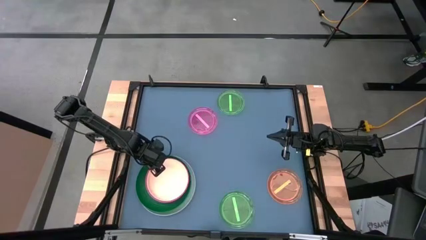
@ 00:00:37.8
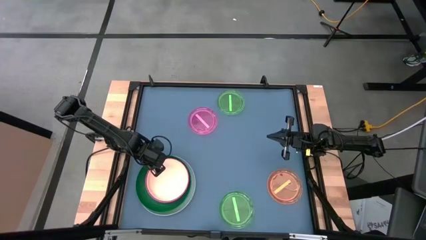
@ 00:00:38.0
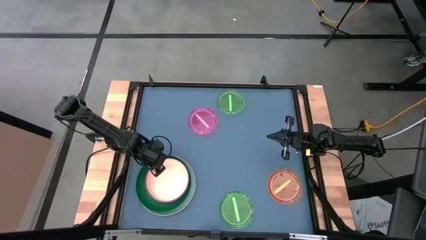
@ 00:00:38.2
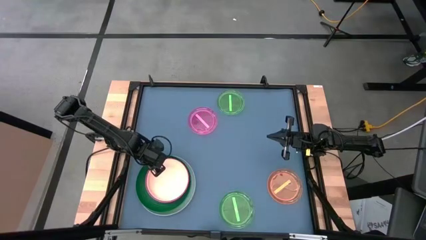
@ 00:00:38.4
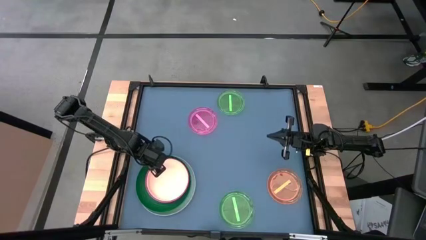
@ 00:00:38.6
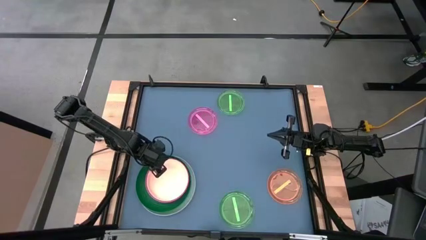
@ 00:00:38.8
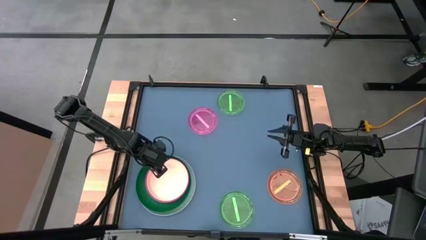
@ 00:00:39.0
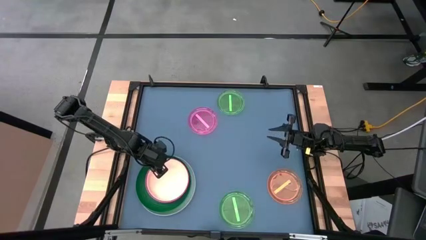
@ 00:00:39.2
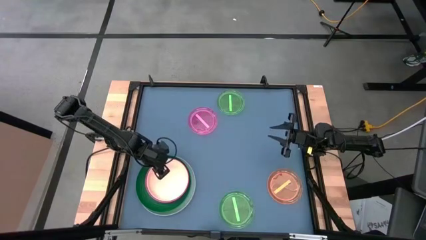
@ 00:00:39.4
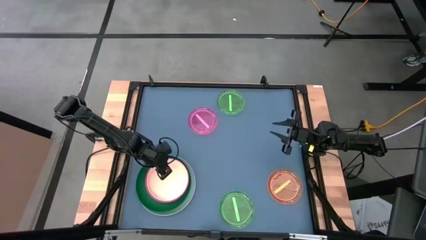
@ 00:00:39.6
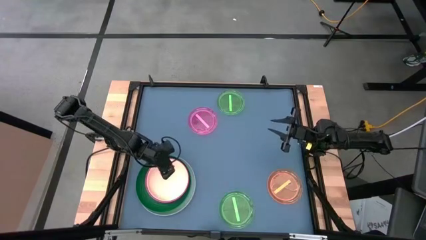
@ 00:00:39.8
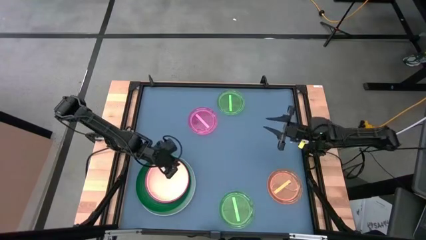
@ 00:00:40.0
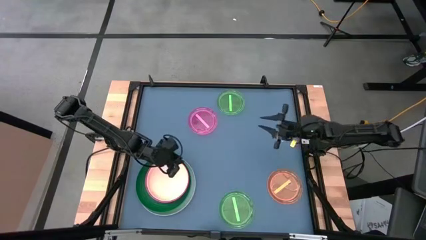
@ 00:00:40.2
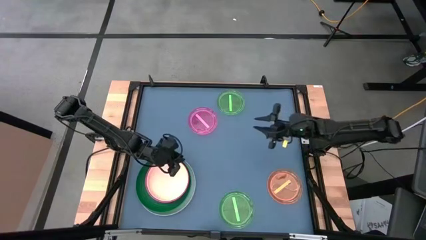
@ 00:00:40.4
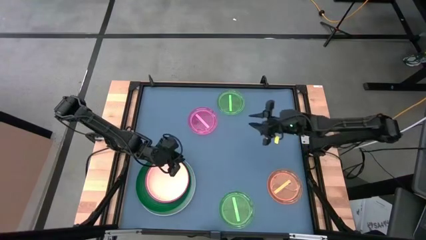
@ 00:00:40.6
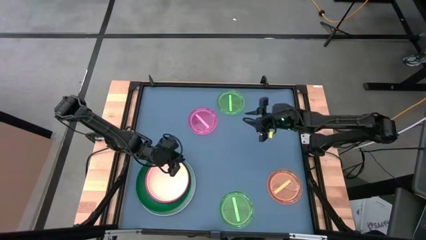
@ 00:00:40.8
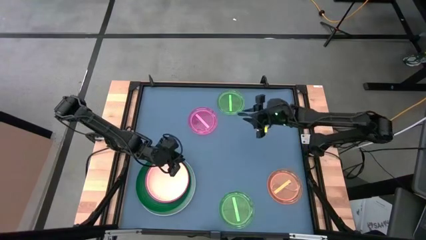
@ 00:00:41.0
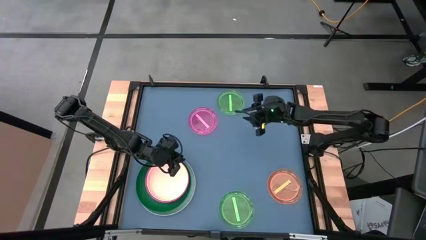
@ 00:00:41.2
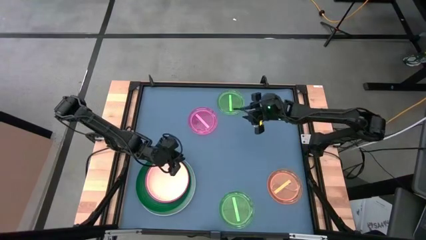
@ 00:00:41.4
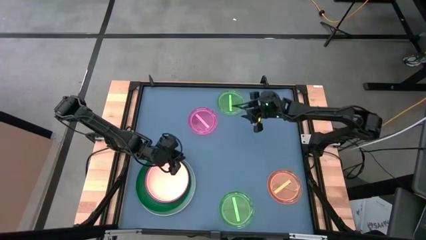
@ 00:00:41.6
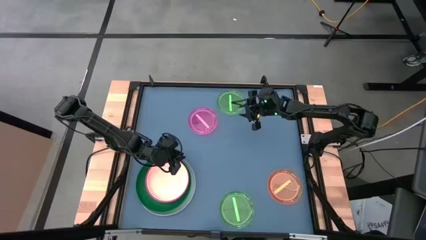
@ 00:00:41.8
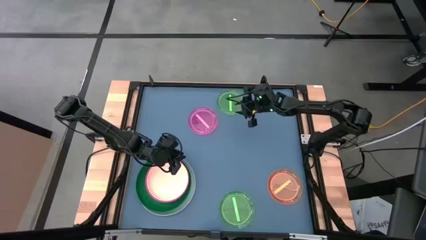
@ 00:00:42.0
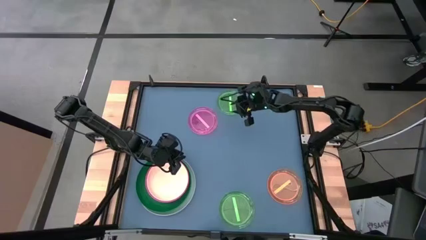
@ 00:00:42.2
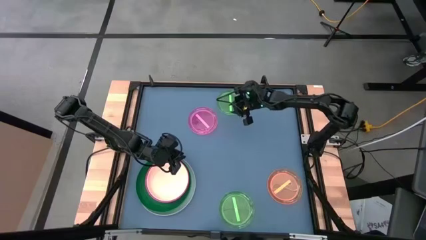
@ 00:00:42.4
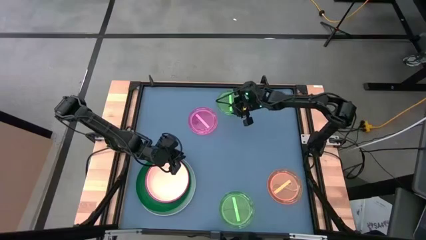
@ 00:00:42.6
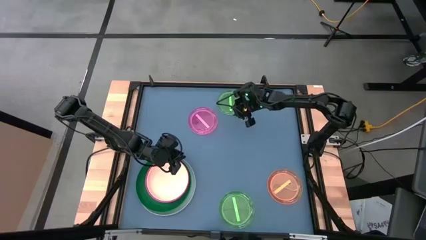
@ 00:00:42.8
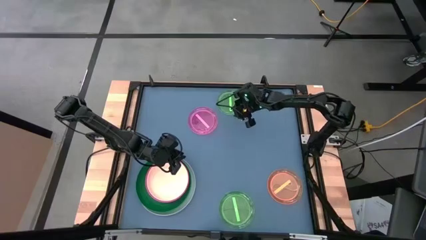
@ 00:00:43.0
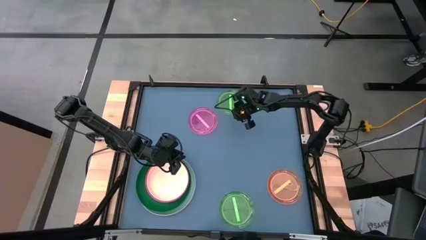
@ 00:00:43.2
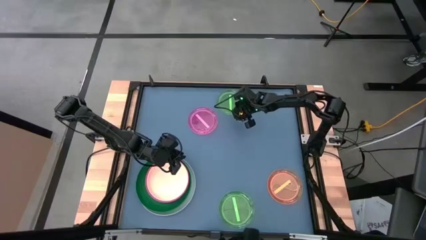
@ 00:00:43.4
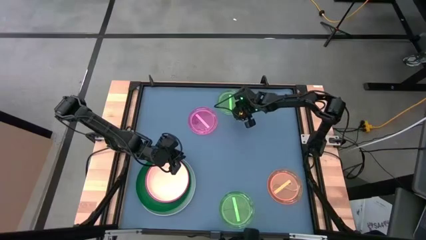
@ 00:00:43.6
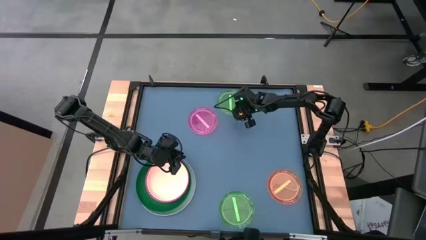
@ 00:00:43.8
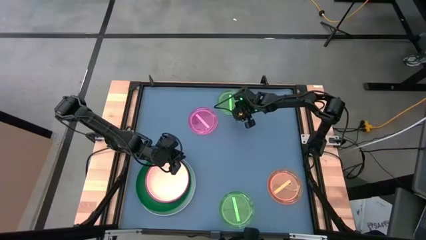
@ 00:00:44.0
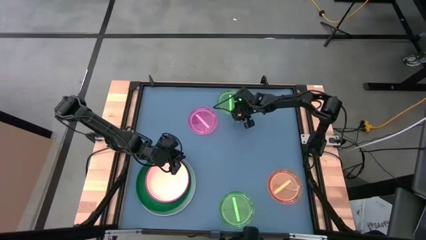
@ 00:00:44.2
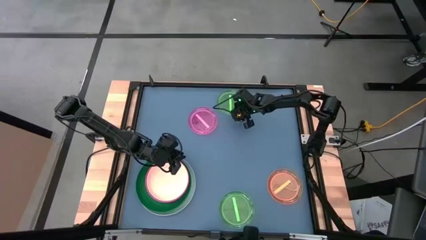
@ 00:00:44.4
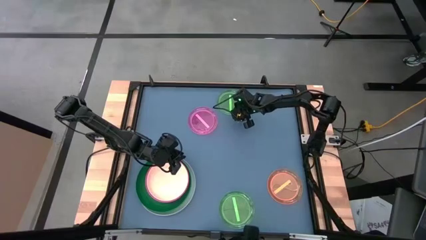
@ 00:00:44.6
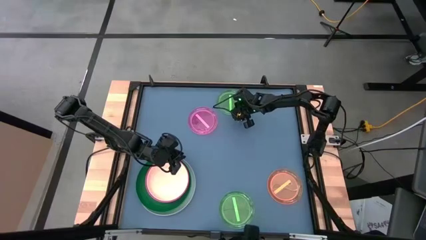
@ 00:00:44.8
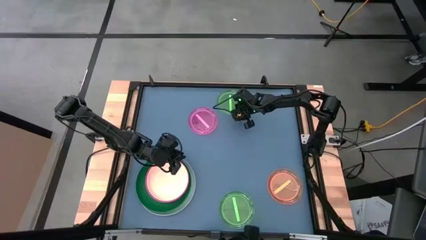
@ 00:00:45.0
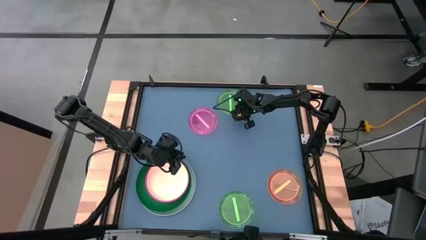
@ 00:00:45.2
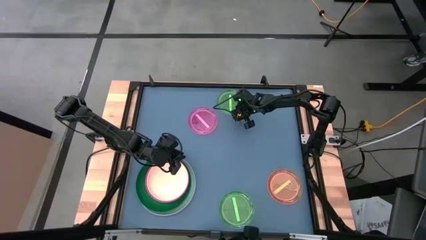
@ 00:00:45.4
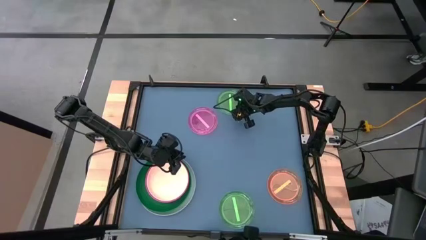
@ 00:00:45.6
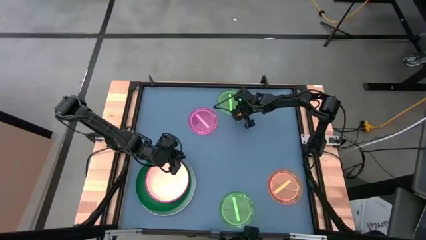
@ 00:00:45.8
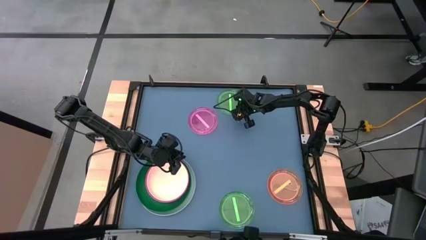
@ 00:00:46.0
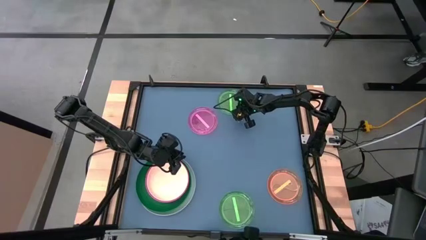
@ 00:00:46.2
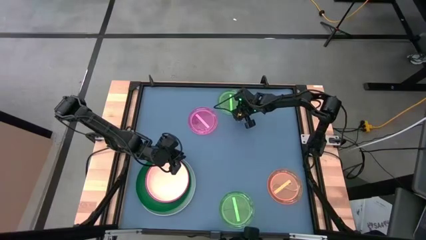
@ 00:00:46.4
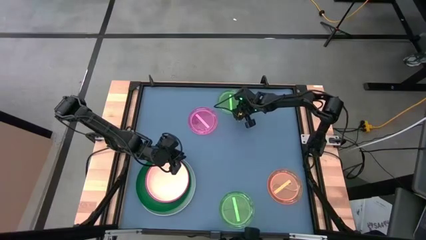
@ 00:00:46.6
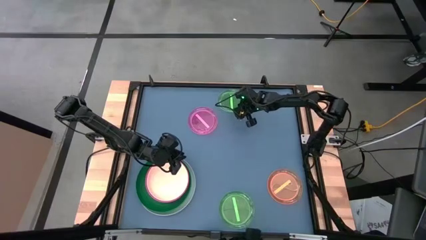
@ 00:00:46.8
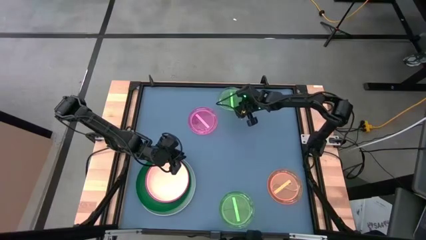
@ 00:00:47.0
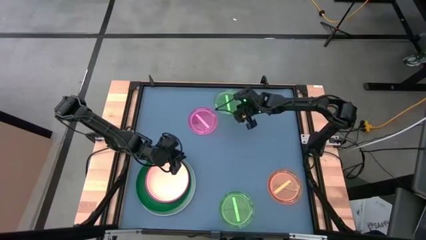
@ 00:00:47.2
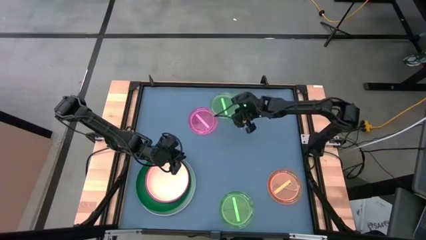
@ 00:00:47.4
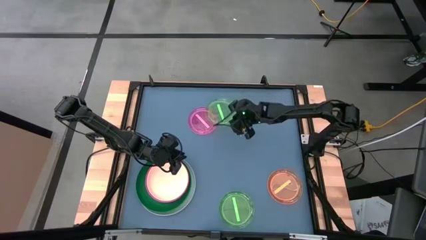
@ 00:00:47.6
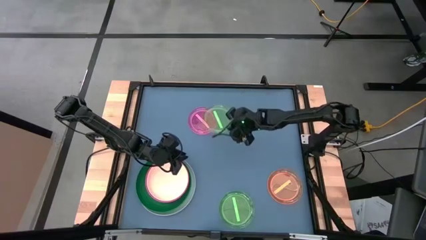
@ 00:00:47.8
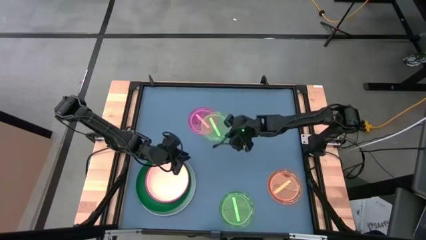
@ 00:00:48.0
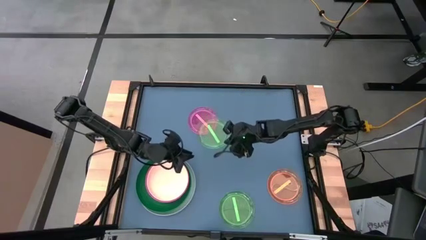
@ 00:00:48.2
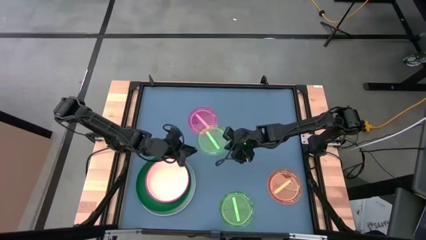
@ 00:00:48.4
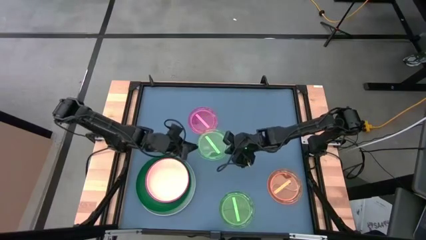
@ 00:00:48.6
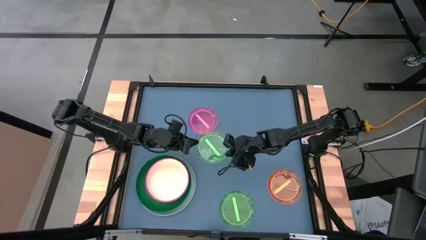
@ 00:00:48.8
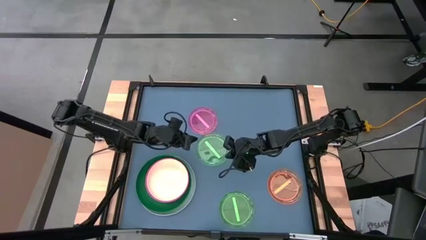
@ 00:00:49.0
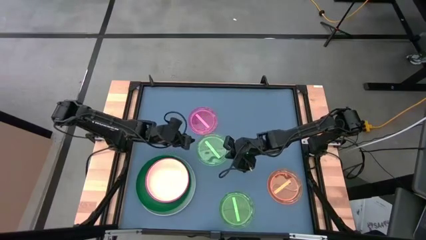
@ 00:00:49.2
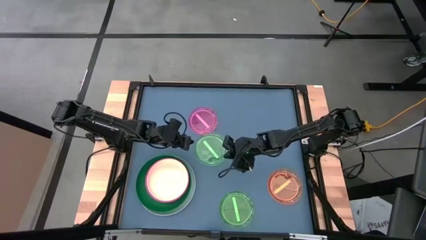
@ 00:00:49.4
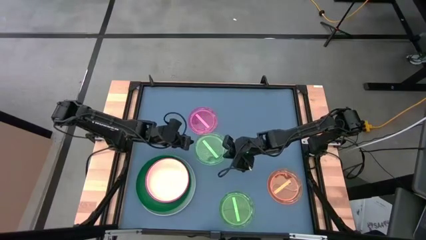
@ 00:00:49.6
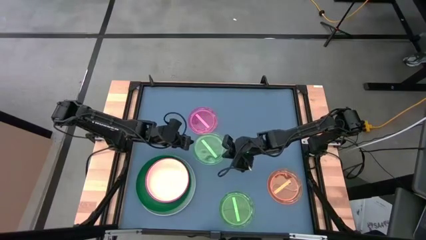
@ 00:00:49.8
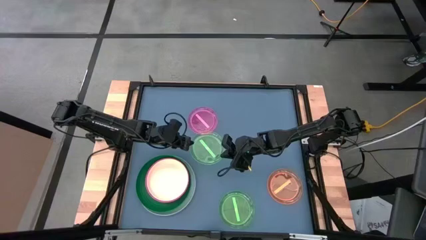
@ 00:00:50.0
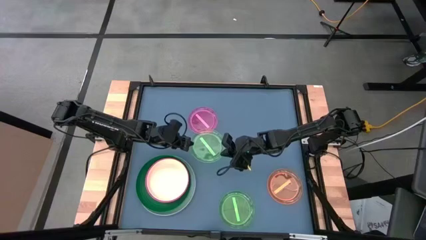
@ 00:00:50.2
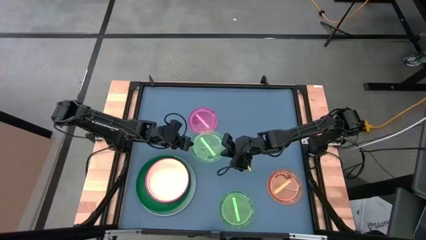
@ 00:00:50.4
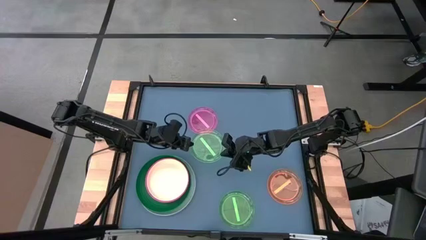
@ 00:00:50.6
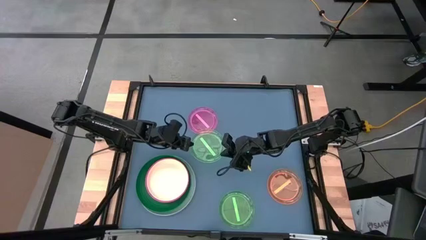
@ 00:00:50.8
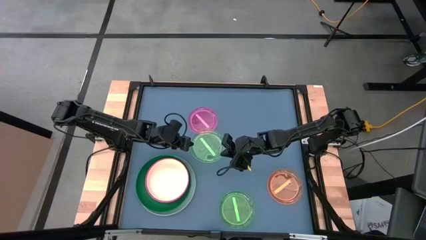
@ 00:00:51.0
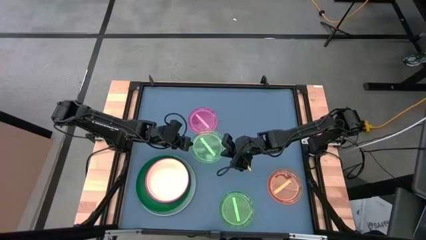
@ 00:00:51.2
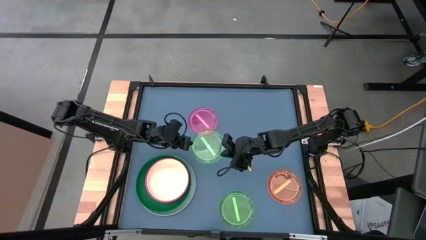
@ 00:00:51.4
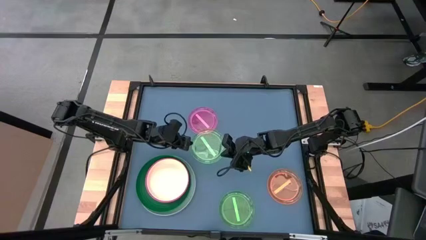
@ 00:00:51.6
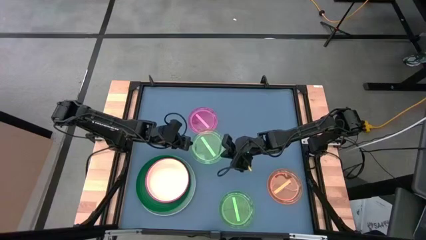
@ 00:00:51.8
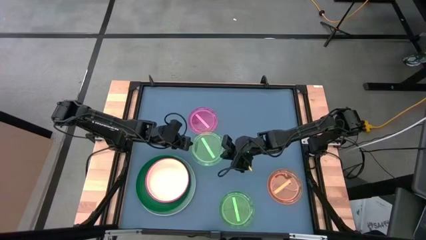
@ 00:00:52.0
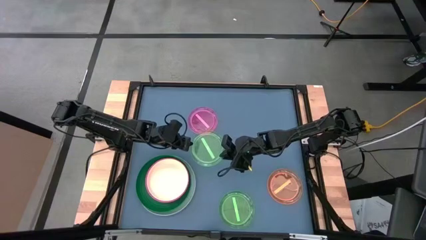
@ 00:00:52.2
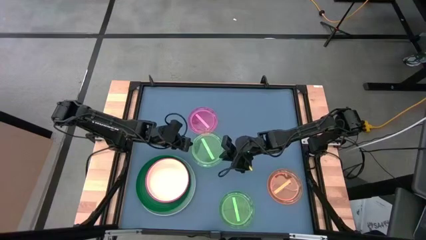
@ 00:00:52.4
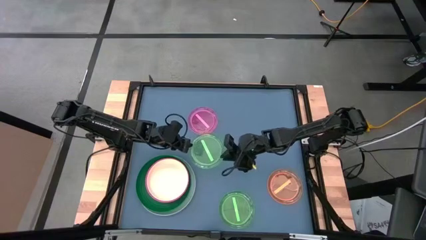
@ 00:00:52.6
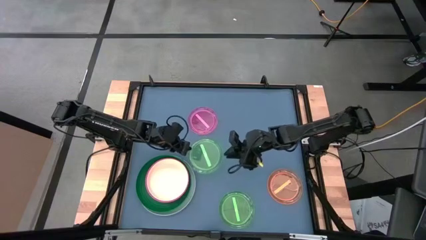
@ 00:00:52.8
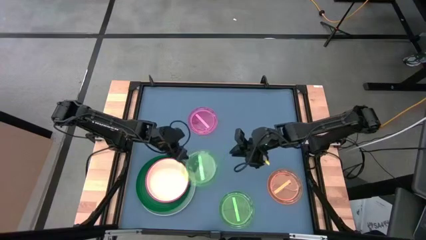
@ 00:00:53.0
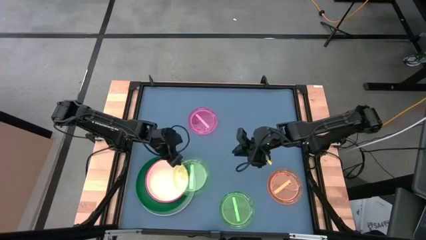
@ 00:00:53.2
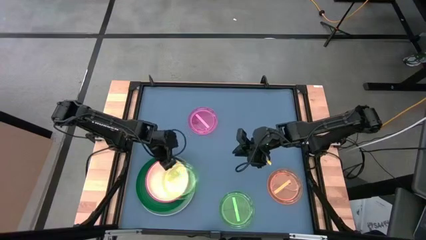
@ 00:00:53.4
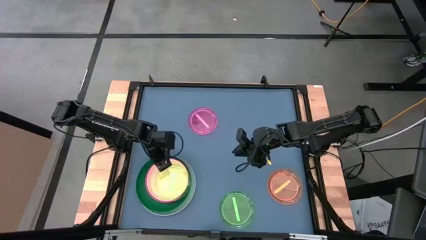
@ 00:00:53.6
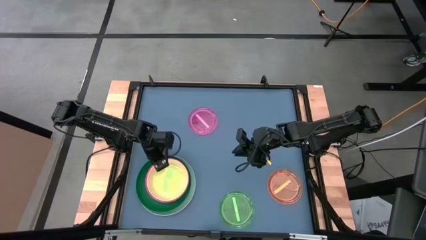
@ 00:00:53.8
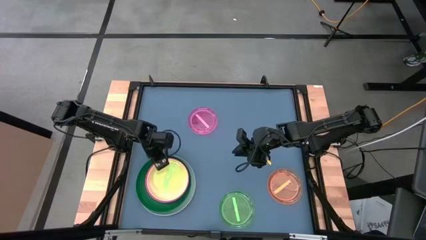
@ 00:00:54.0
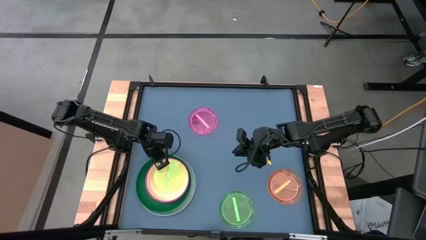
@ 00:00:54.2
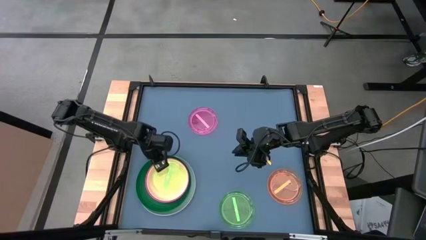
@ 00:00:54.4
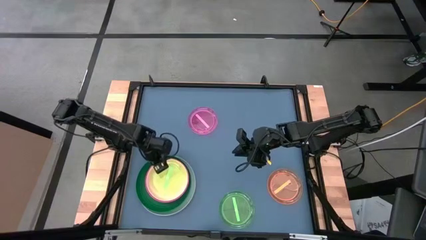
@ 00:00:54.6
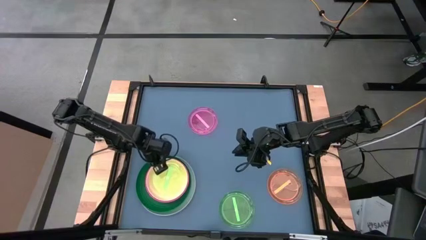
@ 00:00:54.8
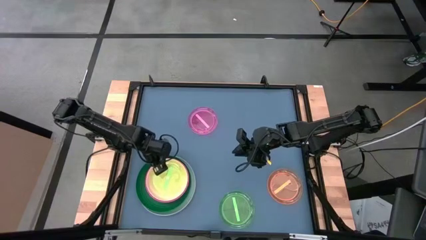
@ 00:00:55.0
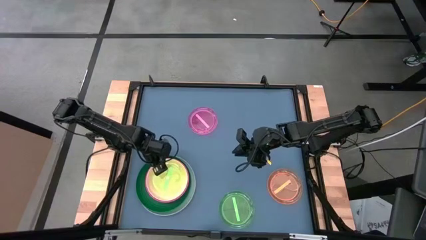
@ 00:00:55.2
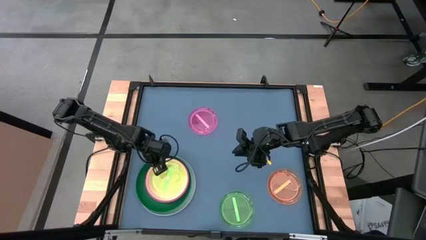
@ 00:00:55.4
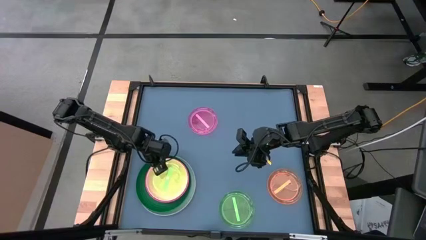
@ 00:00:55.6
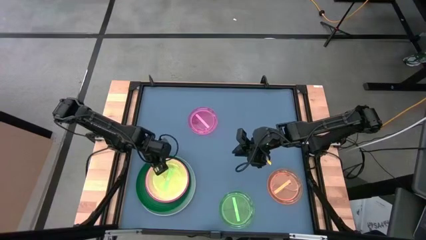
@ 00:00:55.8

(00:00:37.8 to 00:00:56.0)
Task: Stack plastic plates
Stack the top green plate on top of the white plate
